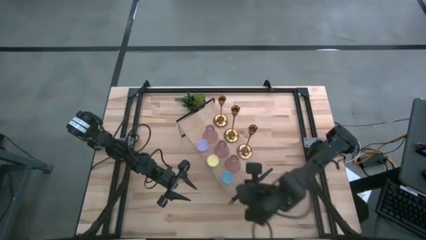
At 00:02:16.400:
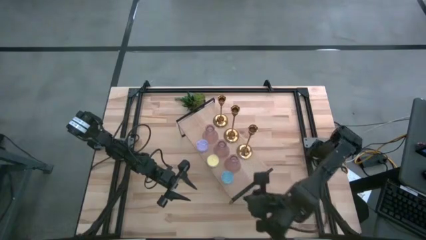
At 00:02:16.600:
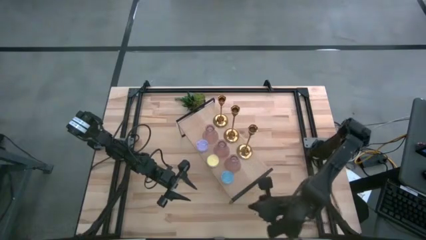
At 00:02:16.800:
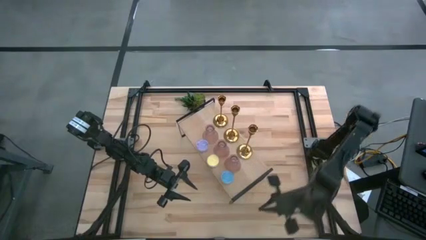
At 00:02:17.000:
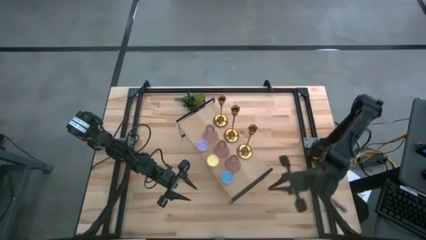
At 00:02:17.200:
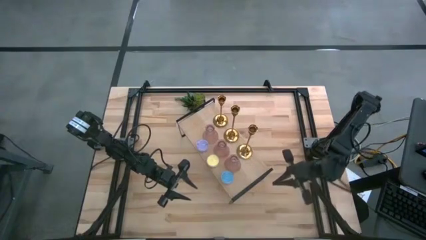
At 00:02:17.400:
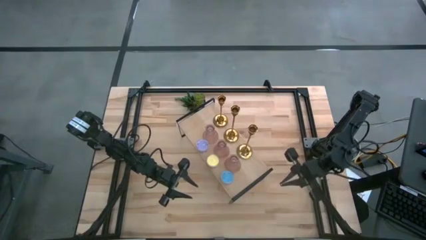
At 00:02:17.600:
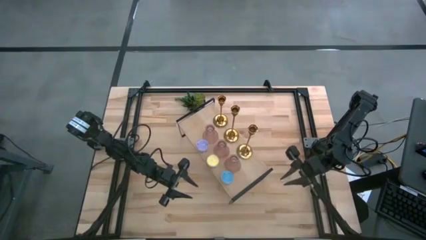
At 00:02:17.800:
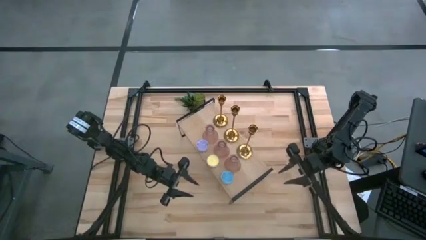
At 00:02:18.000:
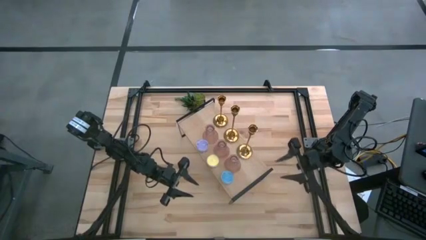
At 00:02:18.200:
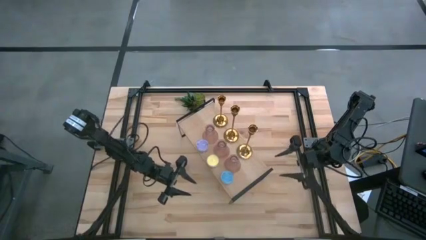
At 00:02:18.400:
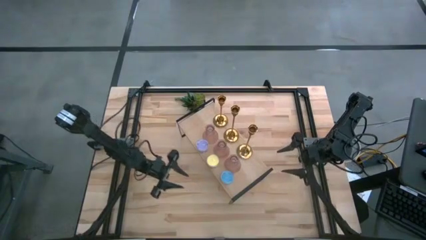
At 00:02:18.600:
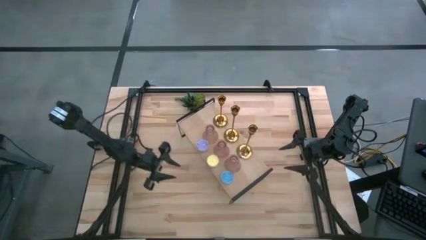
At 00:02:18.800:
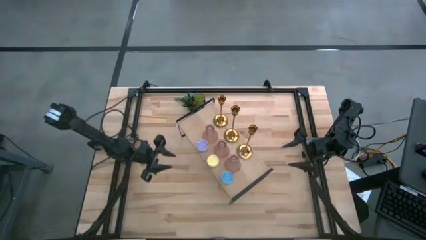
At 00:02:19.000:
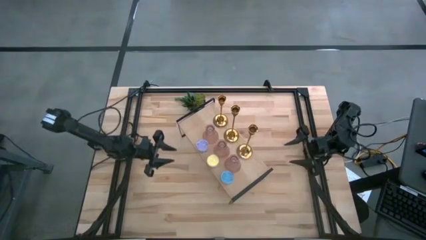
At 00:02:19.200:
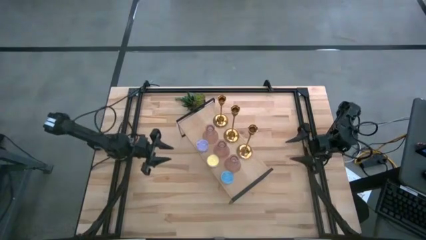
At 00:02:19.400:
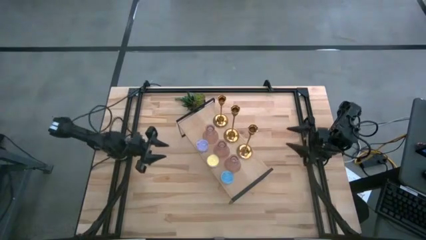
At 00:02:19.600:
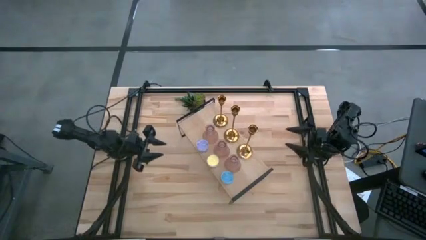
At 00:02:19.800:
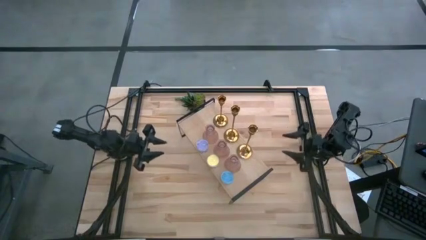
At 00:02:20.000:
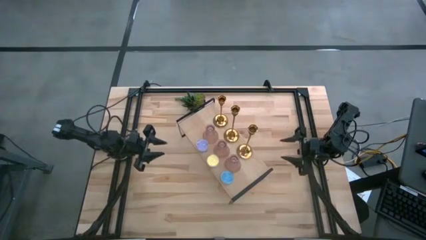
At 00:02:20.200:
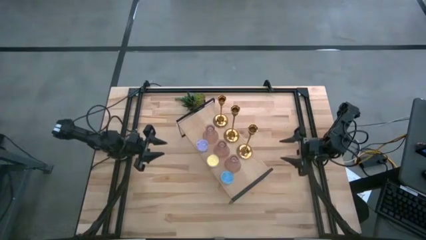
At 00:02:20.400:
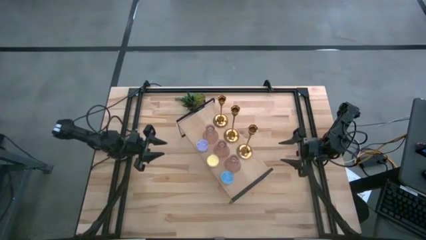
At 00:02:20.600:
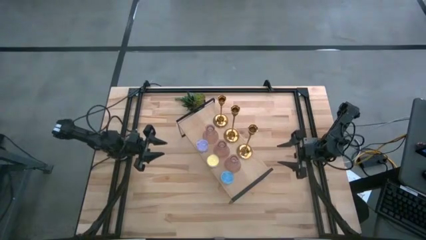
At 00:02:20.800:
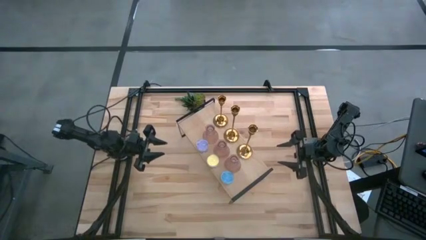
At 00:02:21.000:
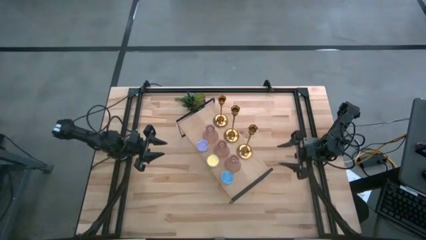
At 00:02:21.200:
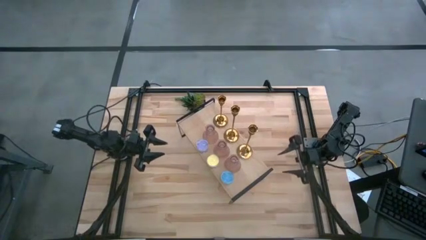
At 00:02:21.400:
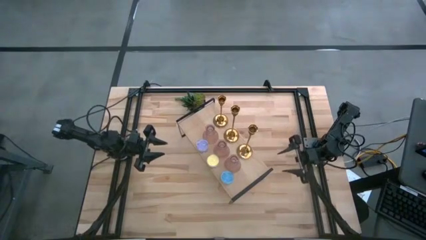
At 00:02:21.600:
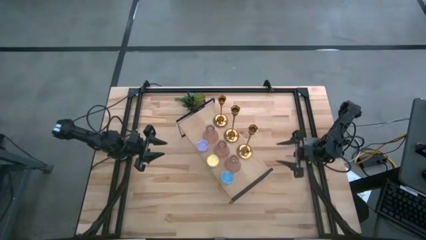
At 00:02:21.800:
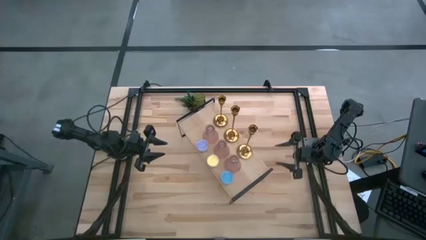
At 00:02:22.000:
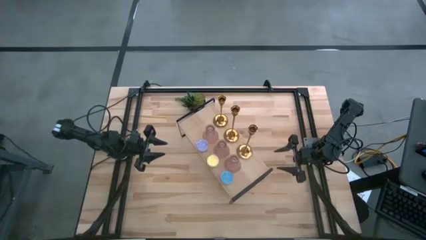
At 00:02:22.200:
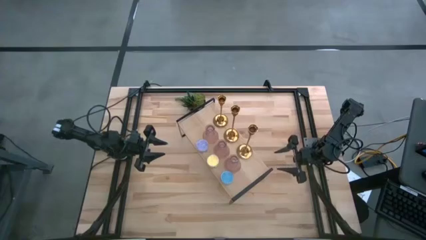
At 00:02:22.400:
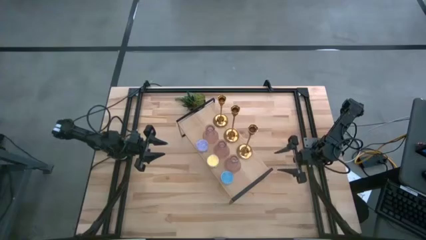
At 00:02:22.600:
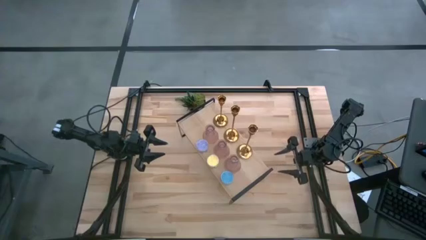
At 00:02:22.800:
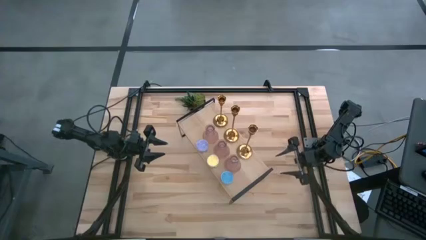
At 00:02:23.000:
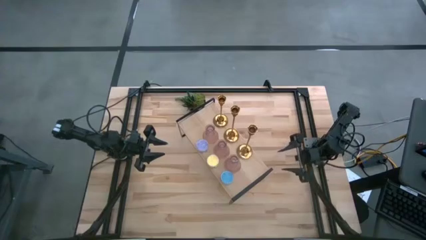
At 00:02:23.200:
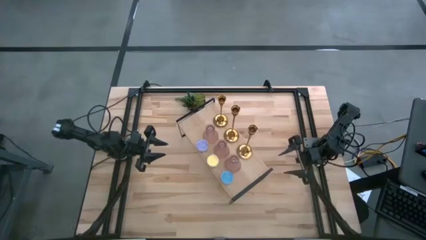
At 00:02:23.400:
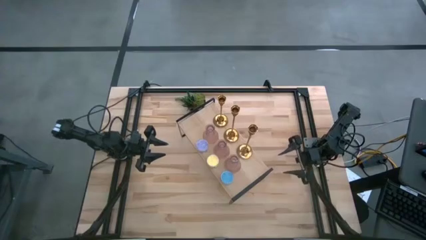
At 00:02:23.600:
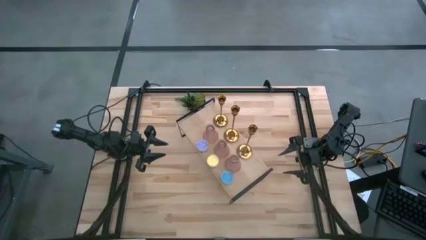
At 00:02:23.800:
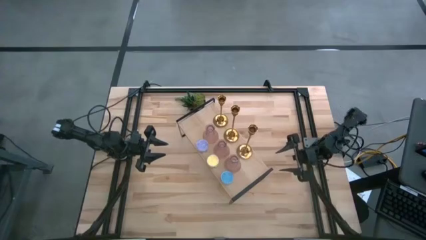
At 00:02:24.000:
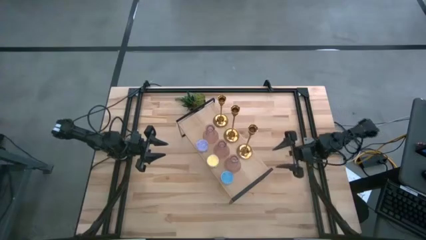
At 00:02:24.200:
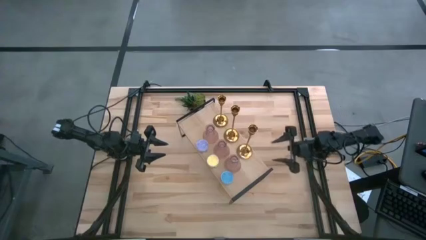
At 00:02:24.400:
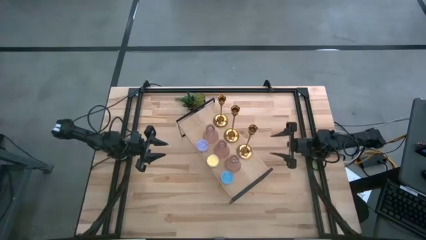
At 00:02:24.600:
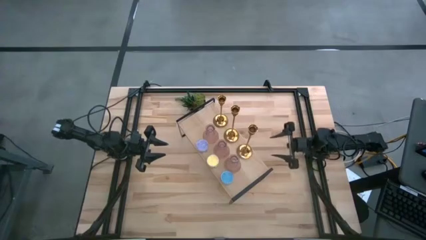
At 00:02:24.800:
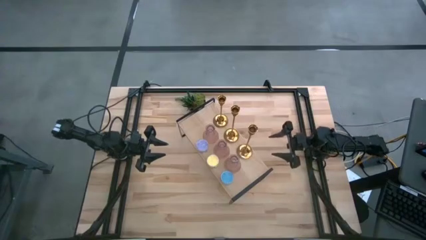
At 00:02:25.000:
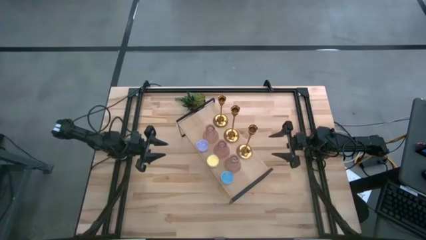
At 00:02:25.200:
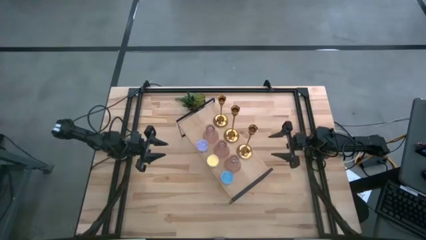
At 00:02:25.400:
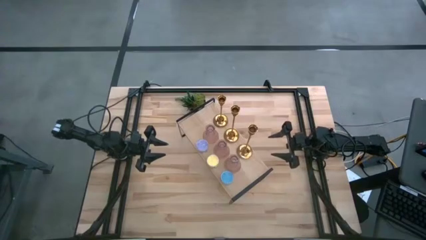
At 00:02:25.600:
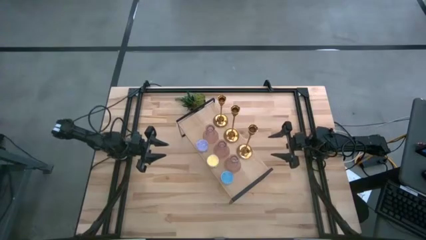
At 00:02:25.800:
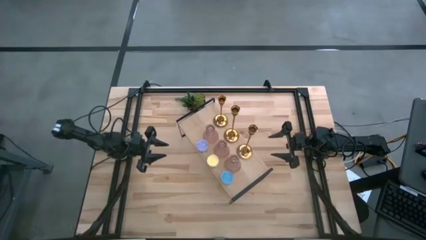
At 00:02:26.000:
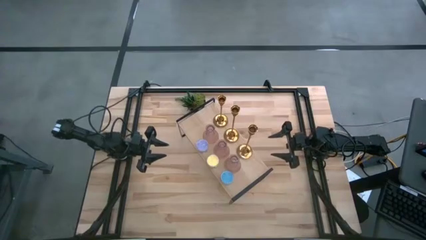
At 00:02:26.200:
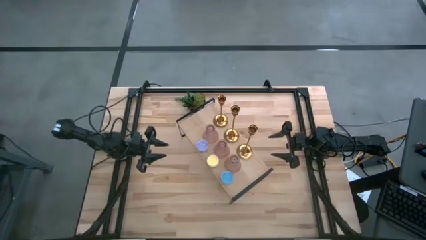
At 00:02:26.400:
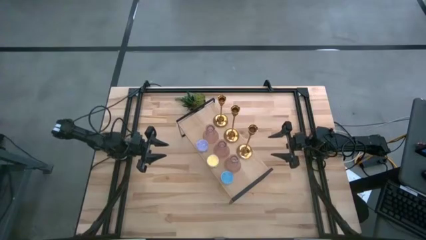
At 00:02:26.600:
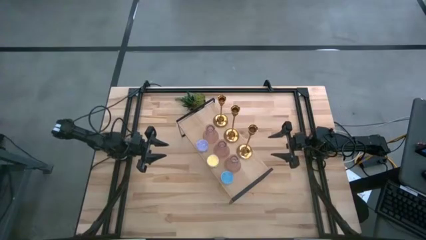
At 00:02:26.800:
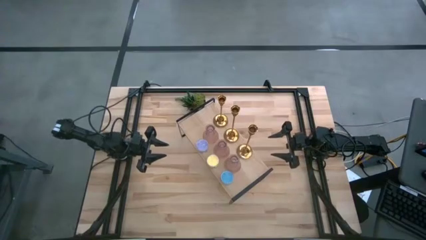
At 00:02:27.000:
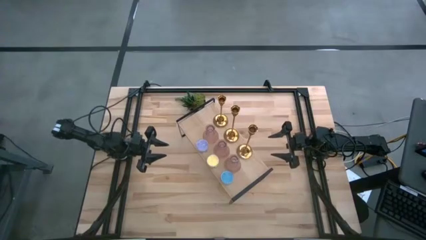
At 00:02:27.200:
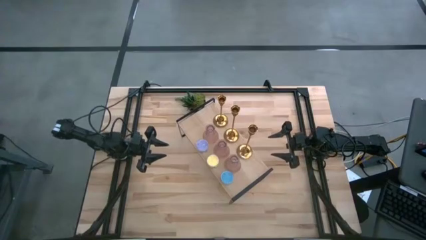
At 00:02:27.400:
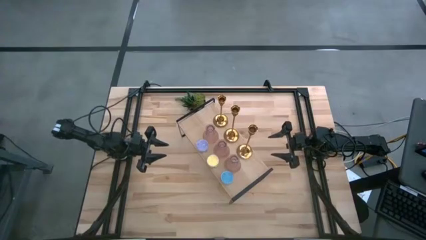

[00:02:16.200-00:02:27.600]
Task: Pick & Place candle stick holders
Return to Home Position

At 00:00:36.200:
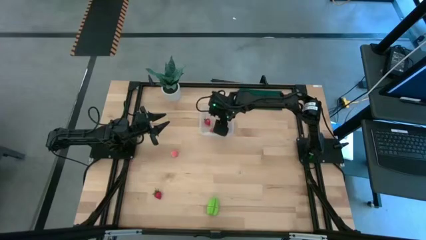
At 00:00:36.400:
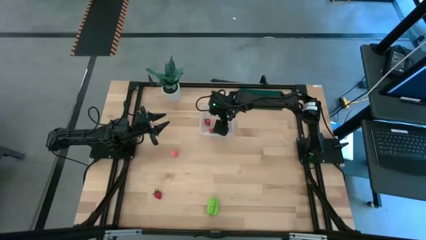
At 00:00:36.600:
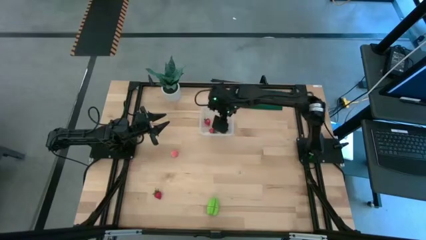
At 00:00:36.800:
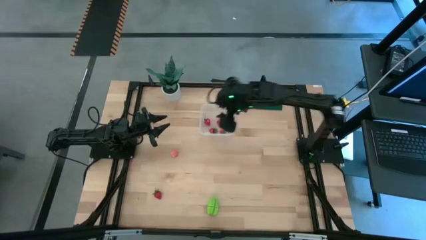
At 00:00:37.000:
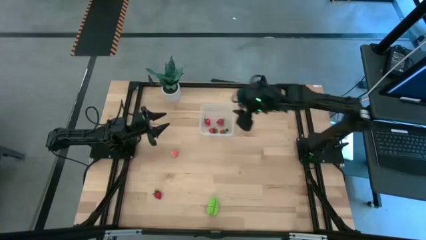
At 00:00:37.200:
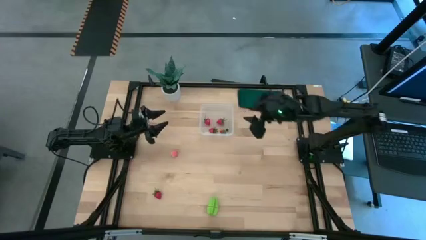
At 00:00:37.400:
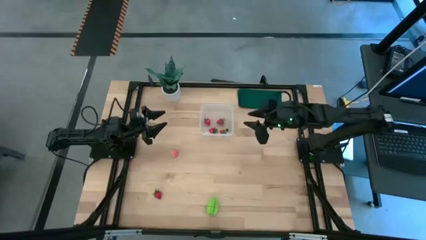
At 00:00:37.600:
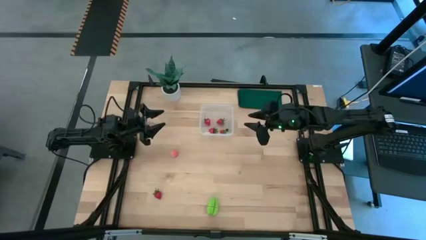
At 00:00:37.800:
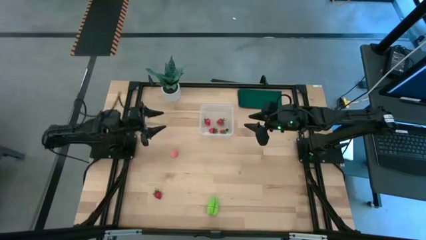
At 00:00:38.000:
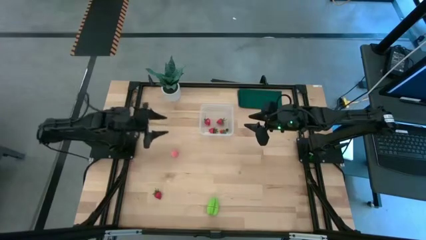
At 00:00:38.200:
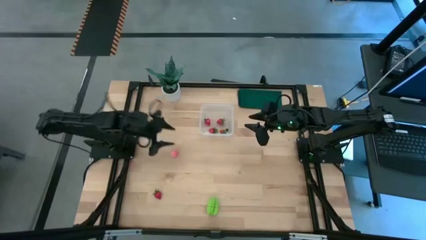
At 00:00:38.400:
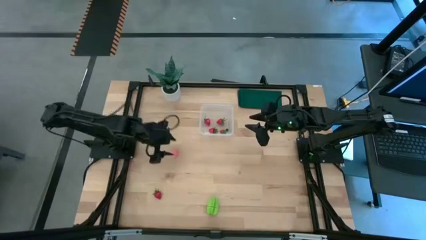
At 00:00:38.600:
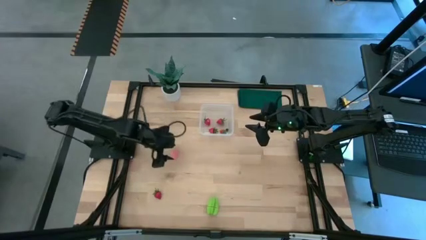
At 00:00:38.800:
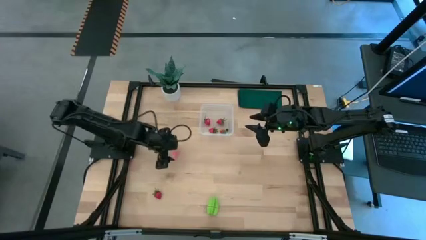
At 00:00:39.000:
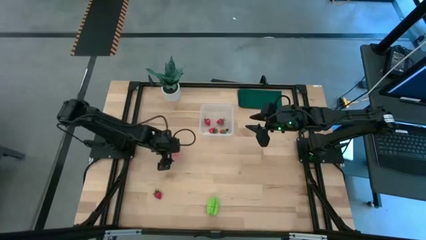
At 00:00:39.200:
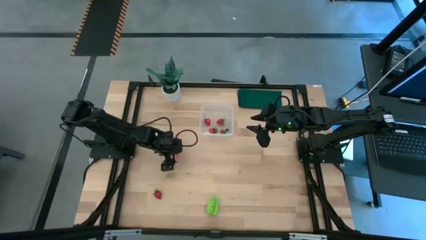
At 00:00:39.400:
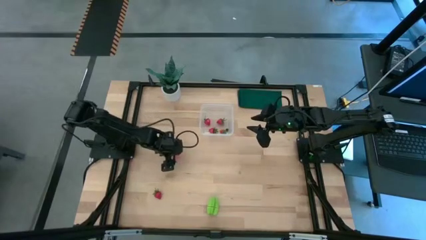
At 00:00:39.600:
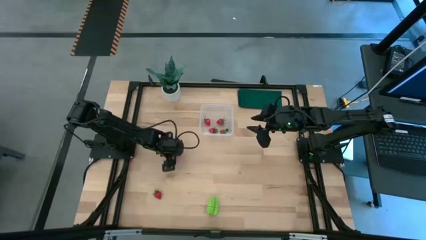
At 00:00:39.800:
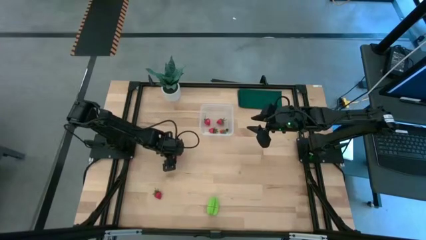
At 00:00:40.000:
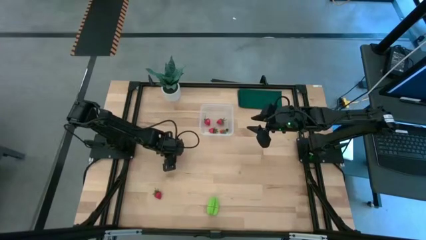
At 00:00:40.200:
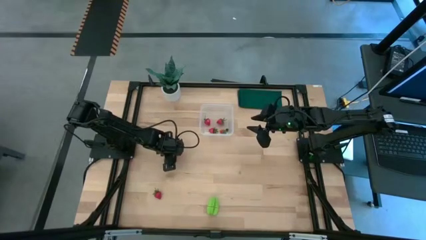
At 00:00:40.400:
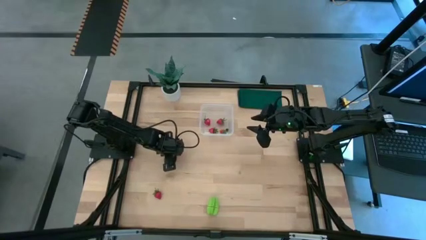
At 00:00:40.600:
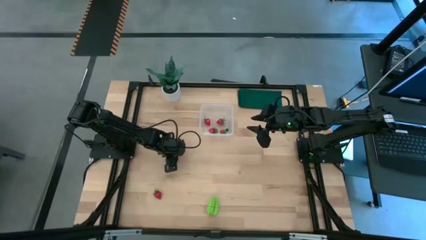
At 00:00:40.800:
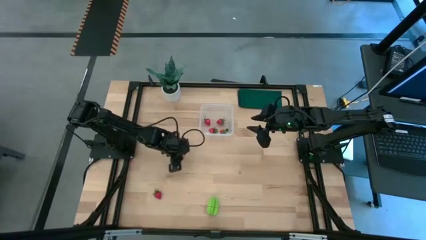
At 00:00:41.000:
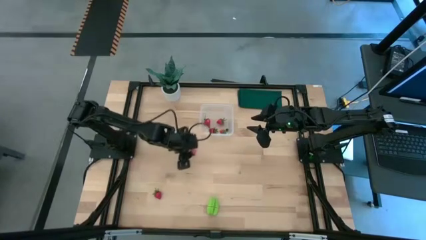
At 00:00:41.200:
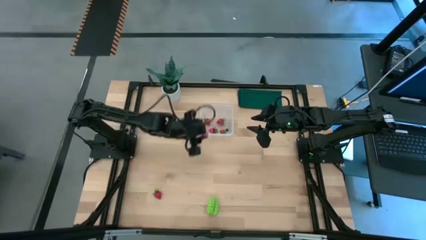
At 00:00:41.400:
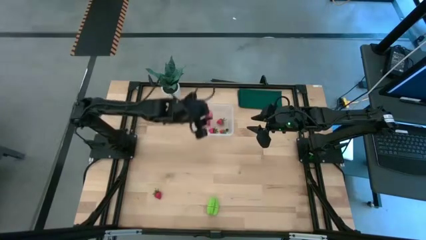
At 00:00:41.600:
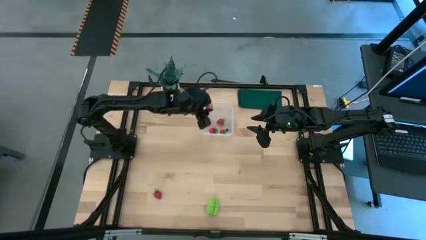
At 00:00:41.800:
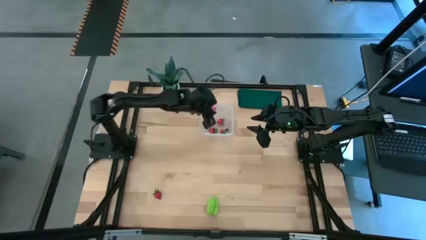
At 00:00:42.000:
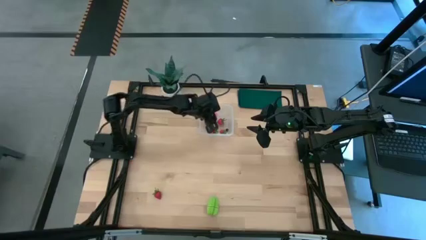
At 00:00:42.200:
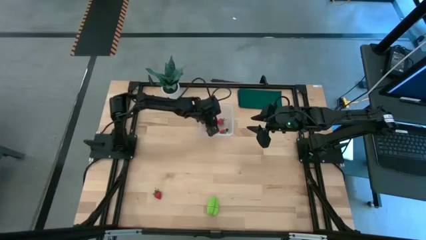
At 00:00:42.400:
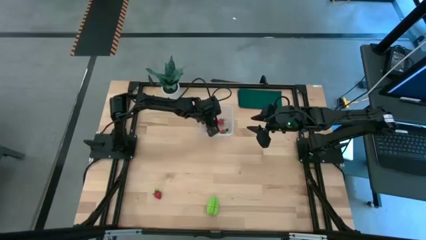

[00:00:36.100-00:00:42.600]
Task: Pick and placing Produce into tupperware
Put the peach into the transparent container
